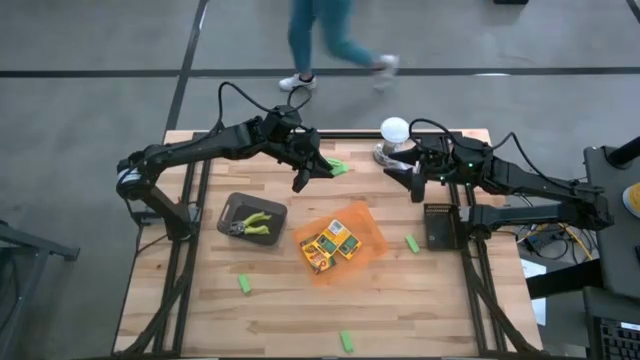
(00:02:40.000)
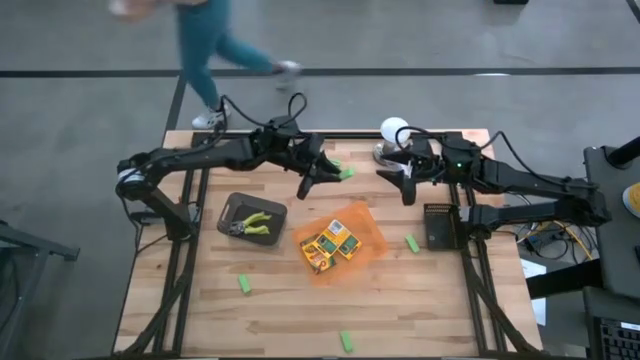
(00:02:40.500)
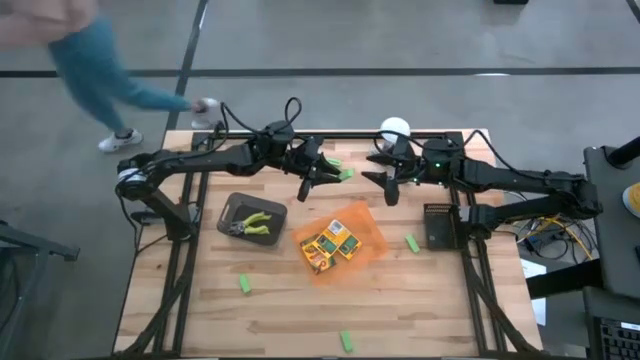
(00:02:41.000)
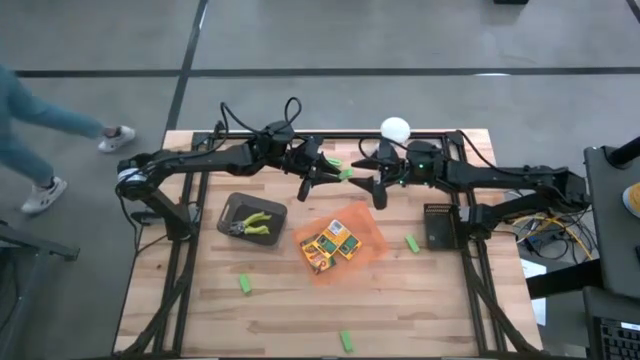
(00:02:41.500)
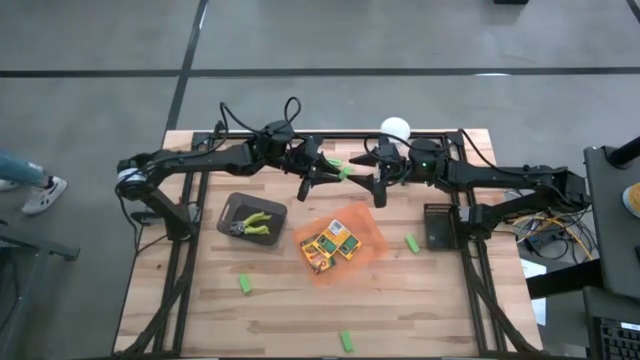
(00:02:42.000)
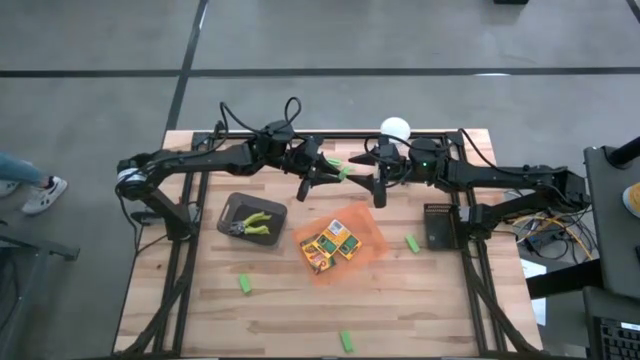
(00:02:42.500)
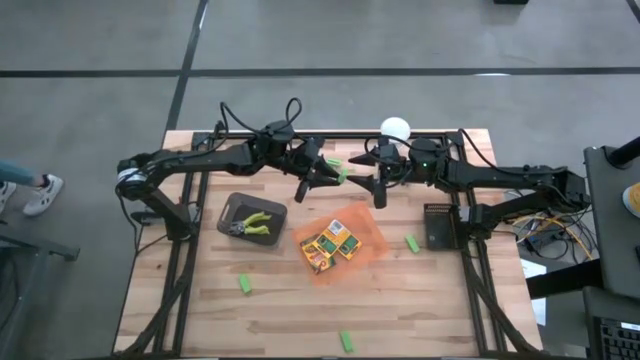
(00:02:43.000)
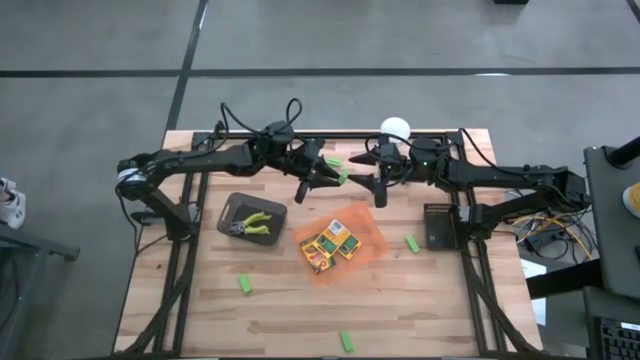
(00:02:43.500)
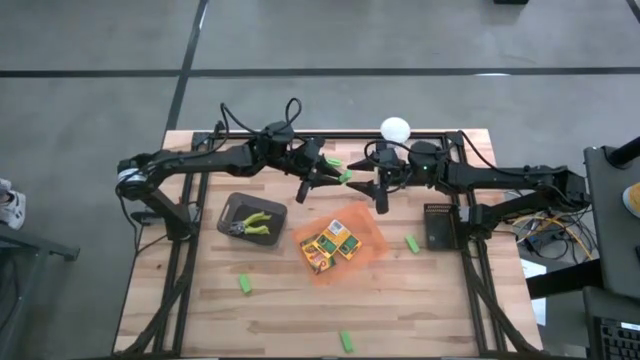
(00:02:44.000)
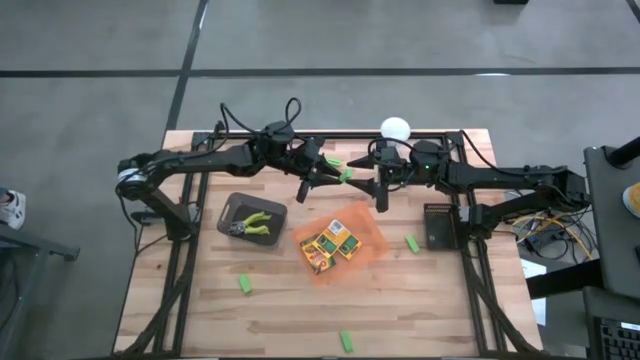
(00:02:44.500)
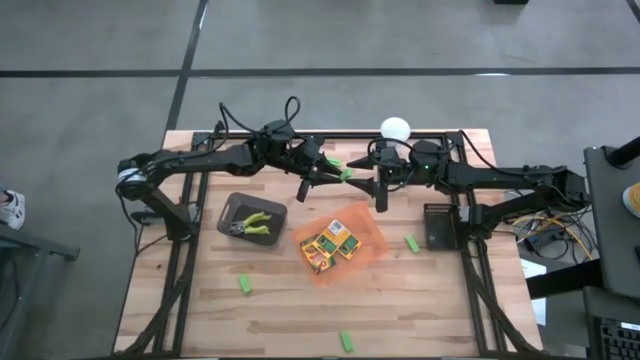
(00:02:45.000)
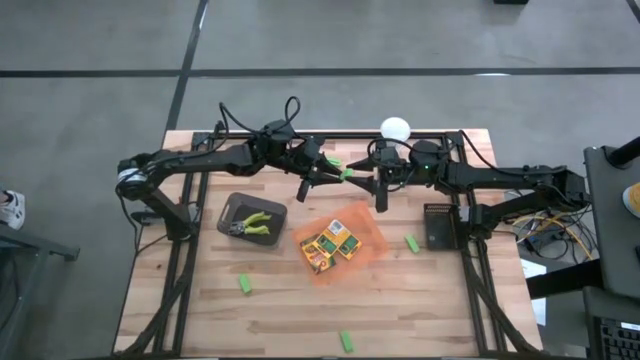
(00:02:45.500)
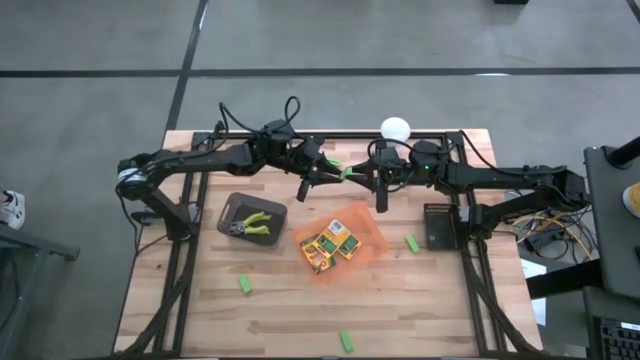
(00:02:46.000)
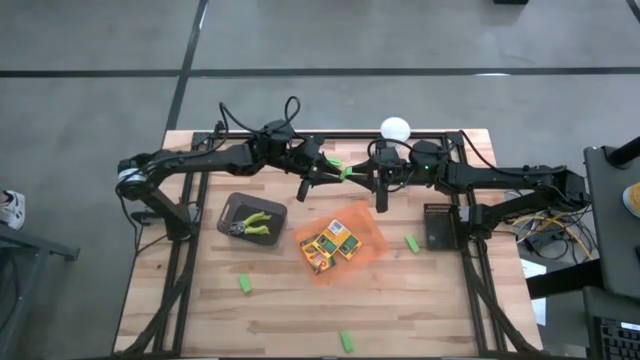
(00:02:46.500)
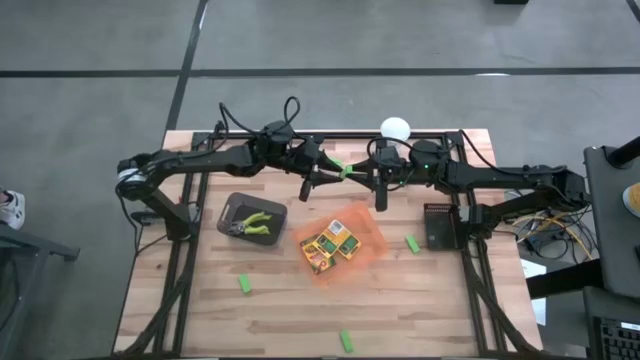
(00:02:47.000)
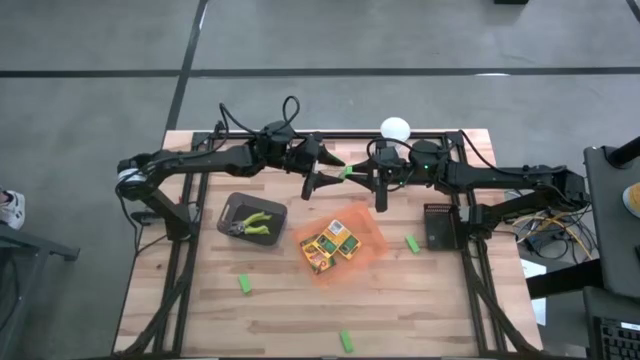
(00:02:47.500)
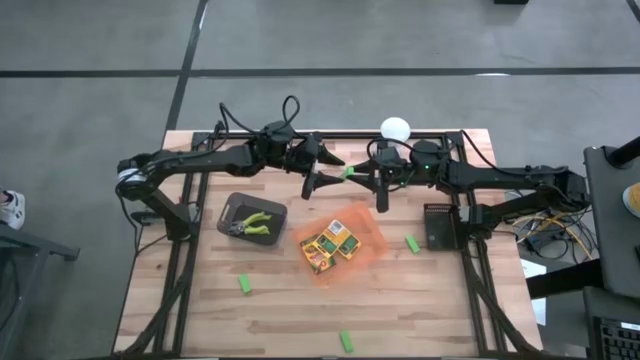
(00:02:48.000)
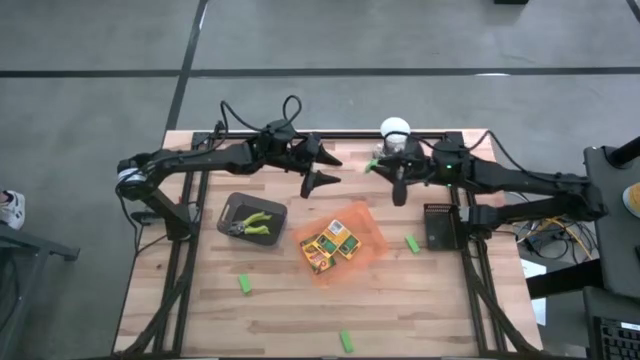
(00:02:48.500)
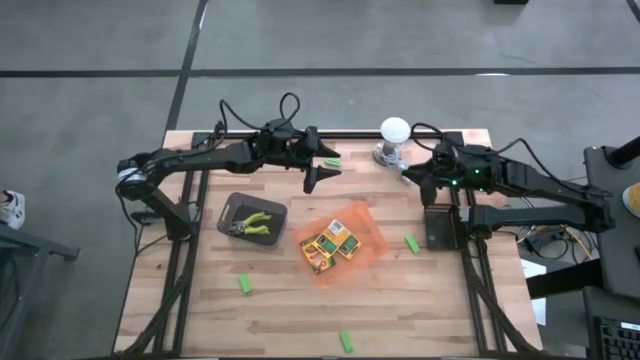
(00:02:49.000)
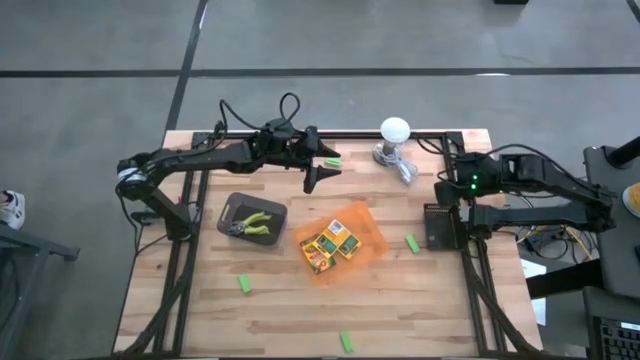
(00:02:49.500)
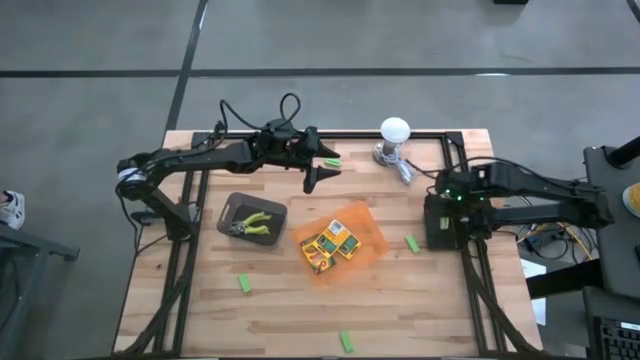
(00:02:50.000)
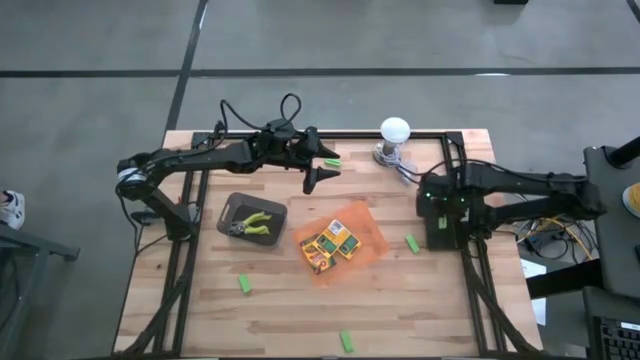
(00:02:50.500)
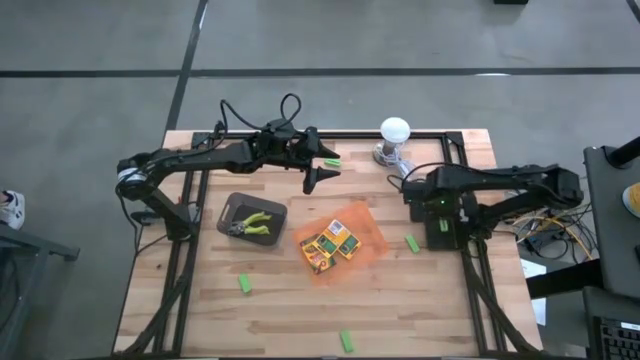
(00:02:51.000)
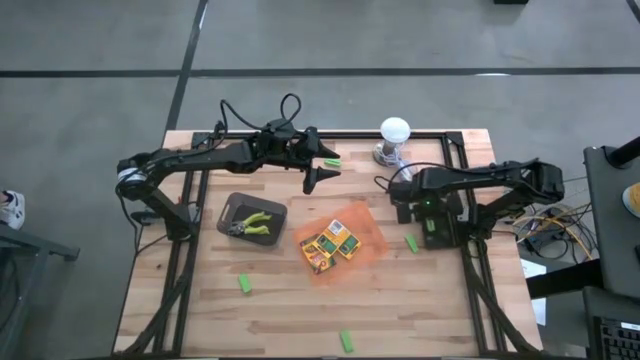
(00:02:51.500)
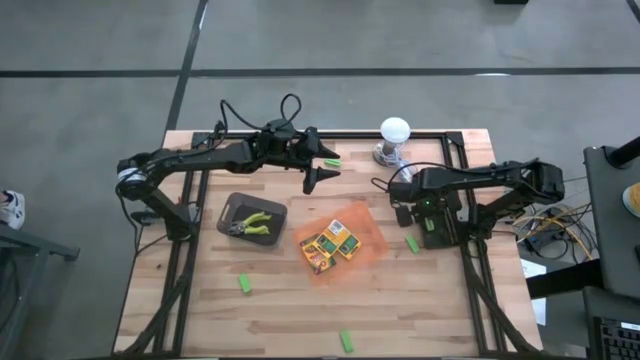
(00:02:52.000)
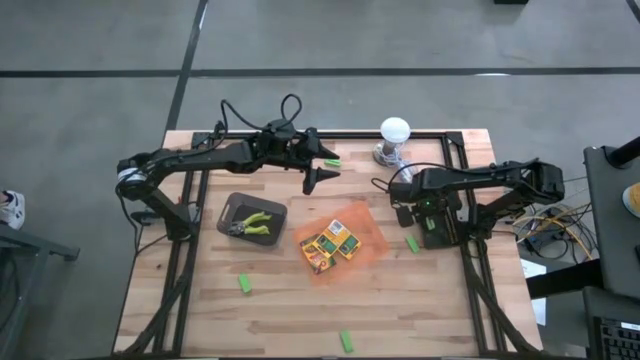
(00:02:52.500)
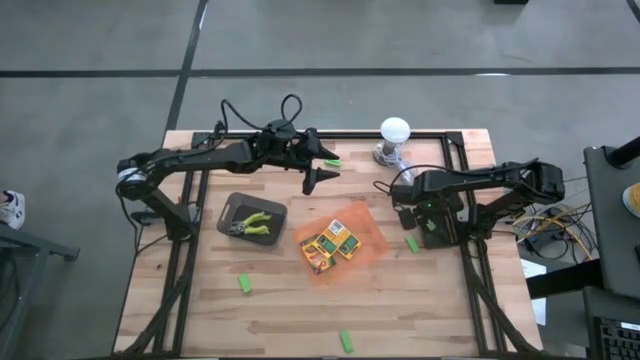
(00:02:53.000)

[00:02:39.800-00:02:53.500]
Task: Pick & Place School Supplies
Put the green eraser into the black basket

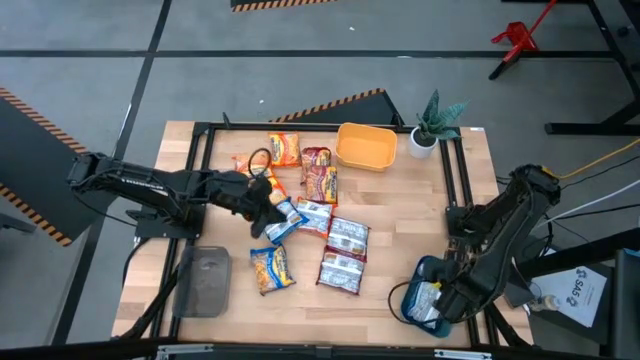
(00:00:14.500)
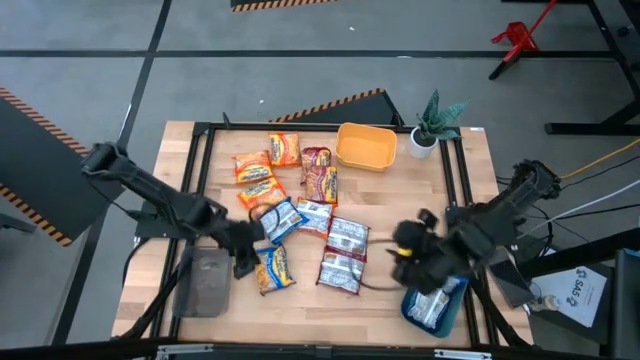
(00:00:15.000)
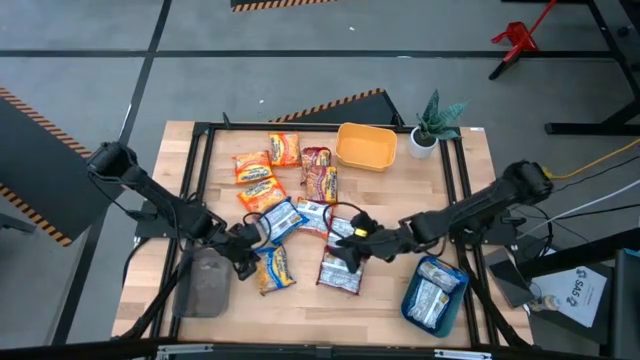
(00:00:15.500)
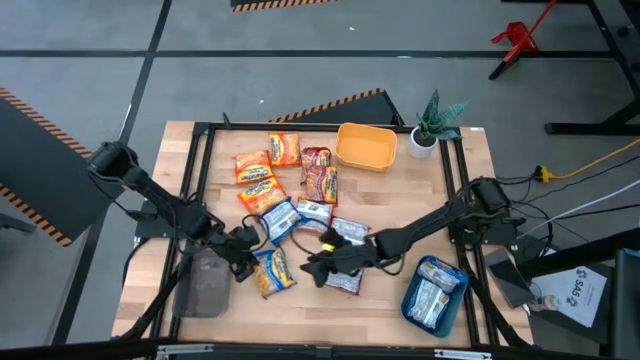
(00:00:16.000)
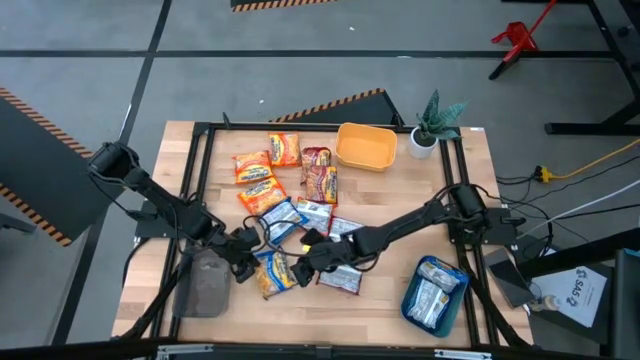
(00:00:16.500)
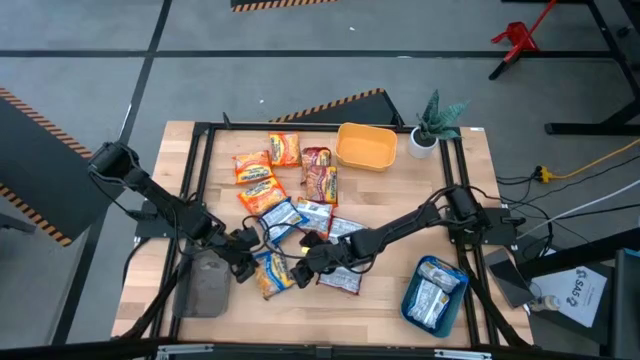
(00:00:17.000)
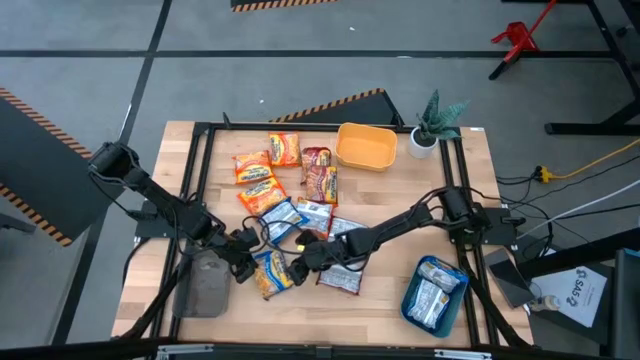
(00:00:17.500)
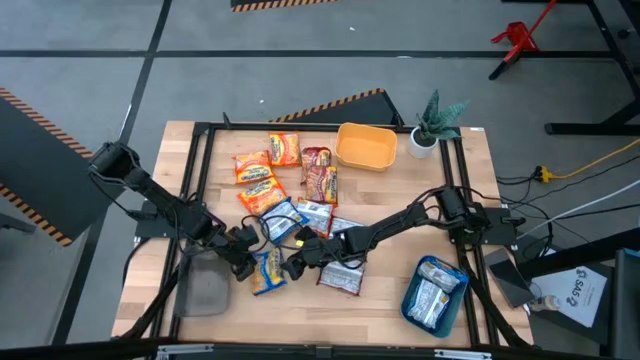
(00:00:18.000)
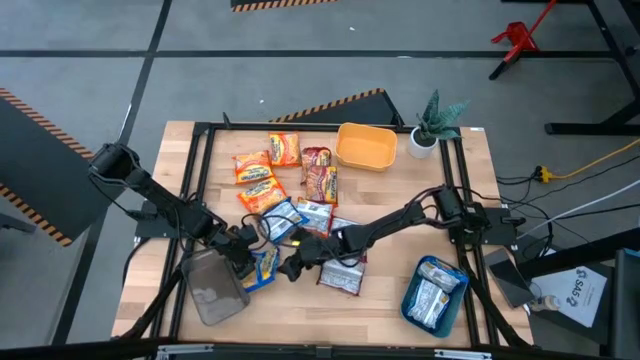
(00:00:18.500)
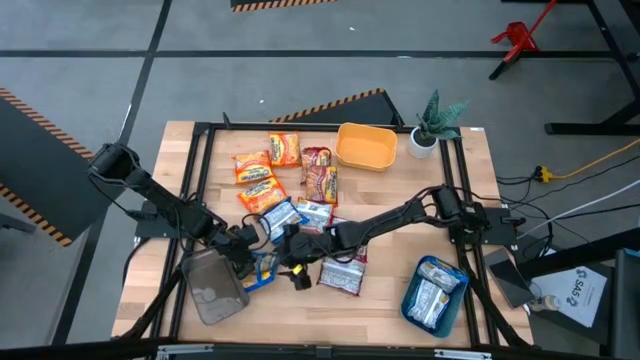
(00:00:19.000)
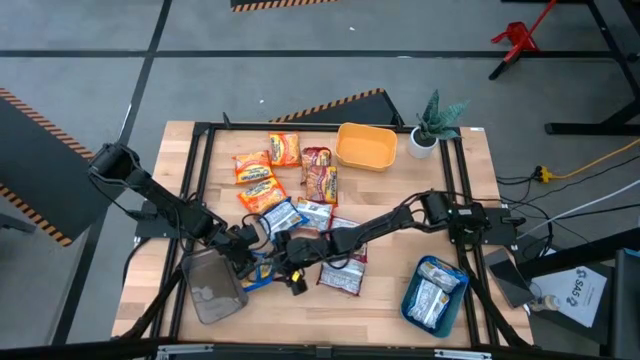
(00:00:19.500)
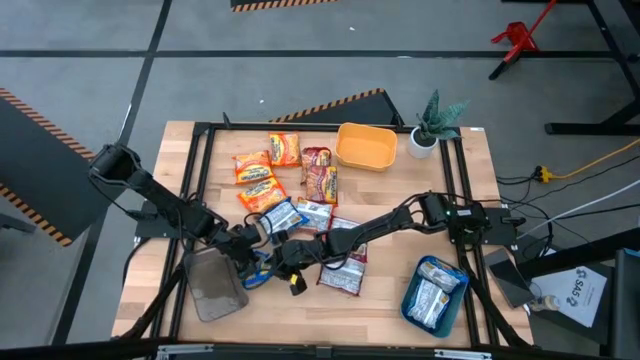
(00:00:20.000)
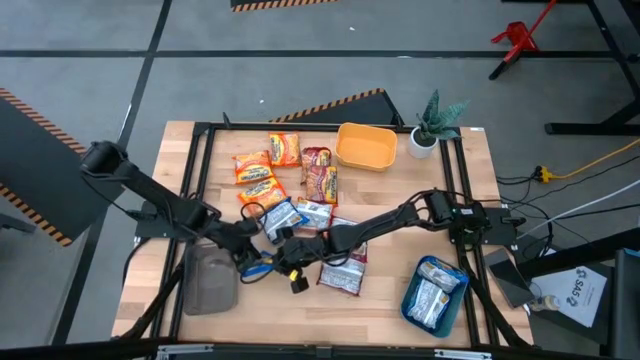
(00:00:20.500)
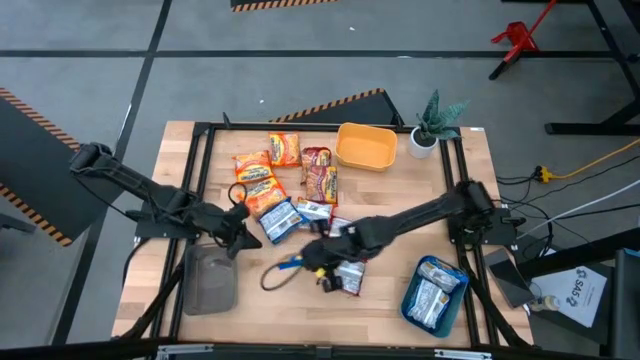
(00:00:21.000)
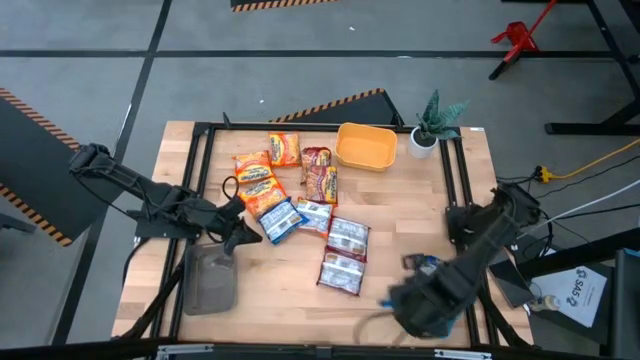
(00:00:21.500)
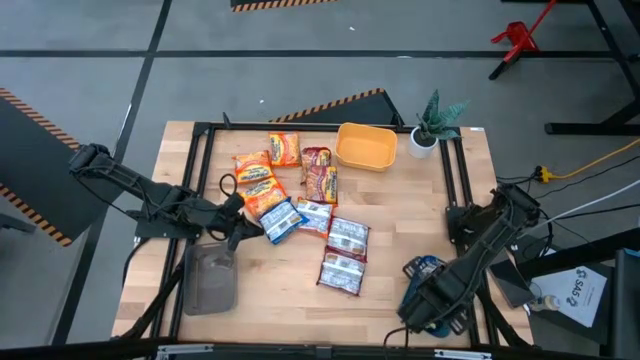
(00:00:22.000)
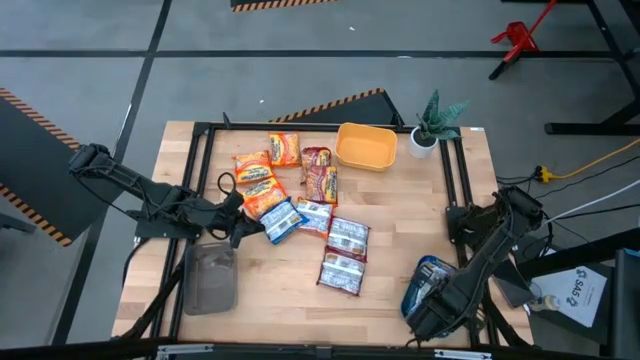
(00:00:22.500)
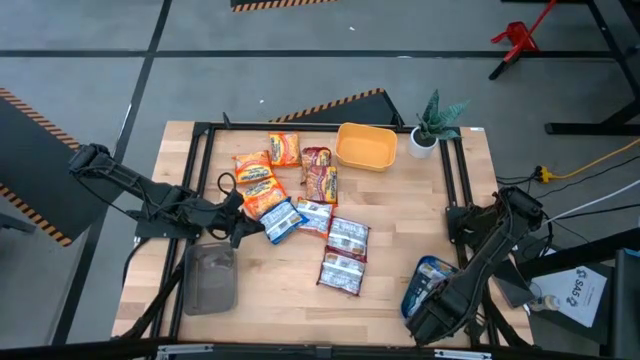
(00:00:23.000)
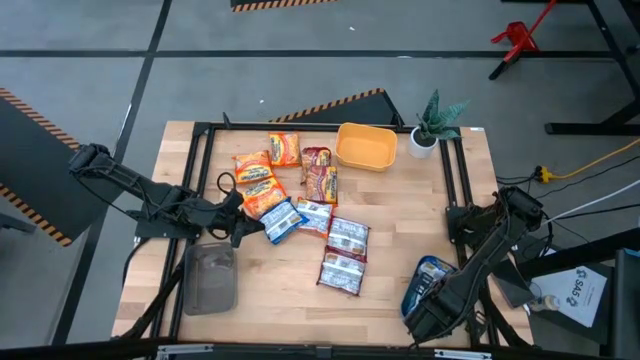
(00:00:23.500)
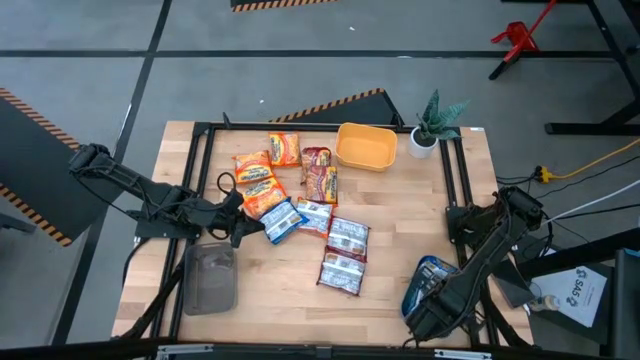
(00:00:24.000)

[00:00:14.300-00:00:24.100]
Task: Sort Maruchan noodles
Put the blue noodle pack into the blue bin
